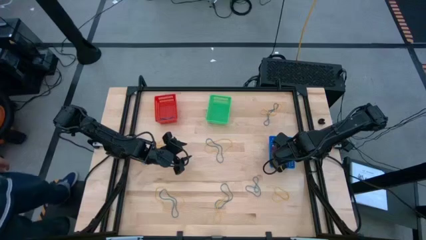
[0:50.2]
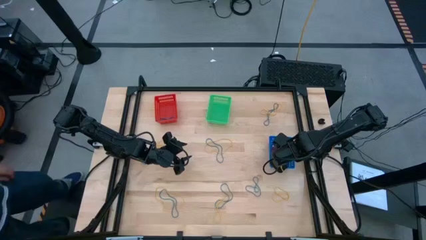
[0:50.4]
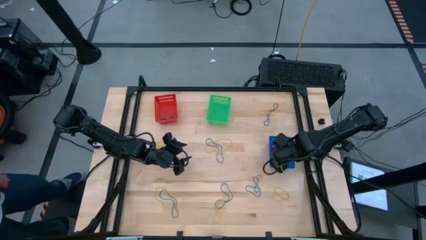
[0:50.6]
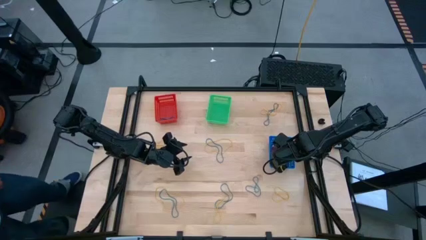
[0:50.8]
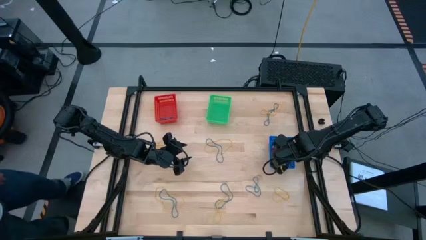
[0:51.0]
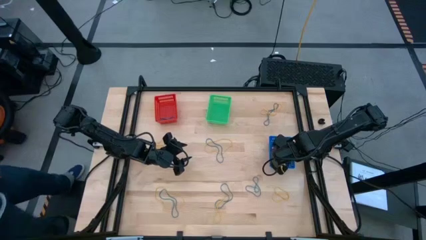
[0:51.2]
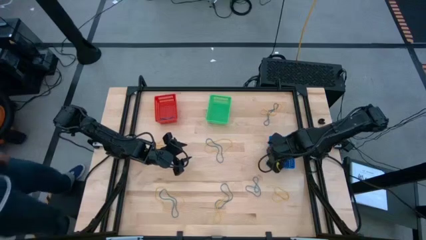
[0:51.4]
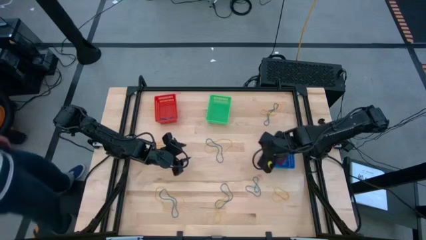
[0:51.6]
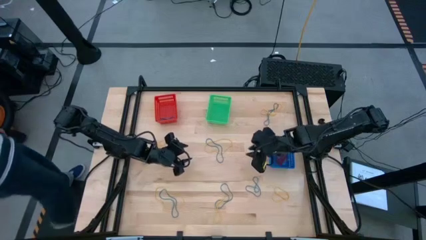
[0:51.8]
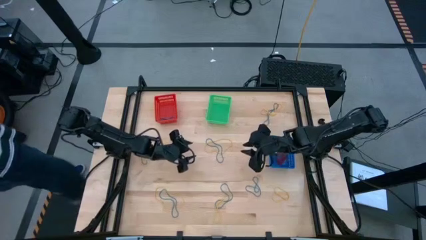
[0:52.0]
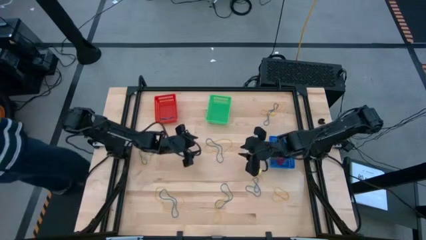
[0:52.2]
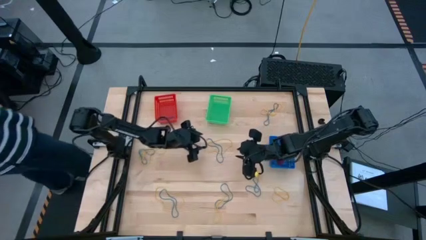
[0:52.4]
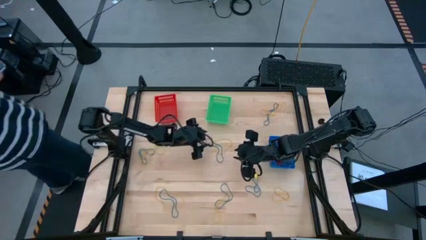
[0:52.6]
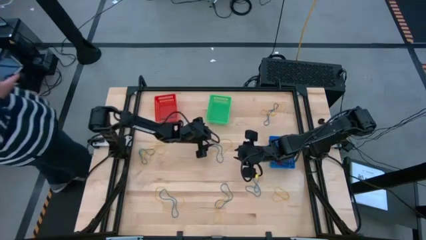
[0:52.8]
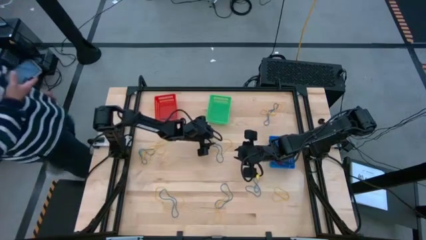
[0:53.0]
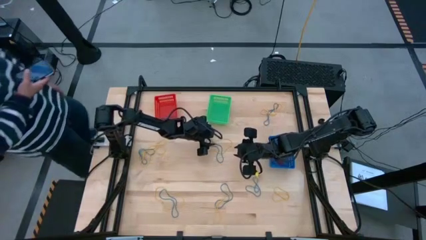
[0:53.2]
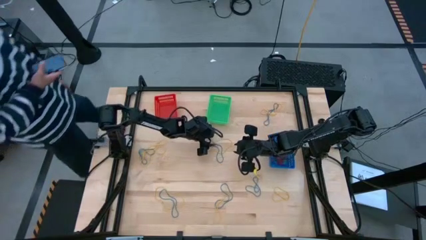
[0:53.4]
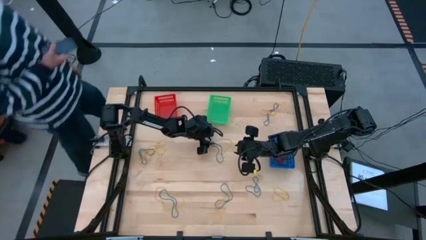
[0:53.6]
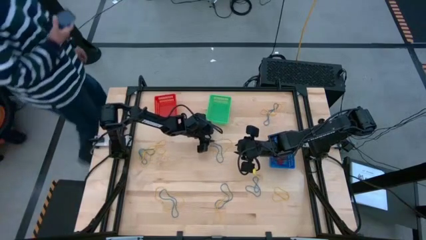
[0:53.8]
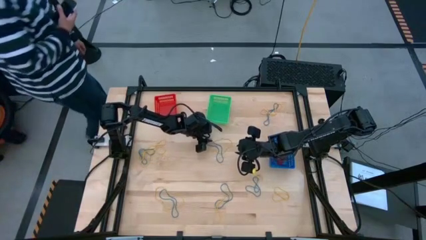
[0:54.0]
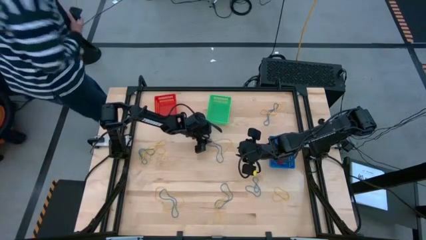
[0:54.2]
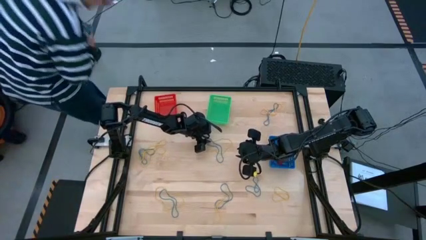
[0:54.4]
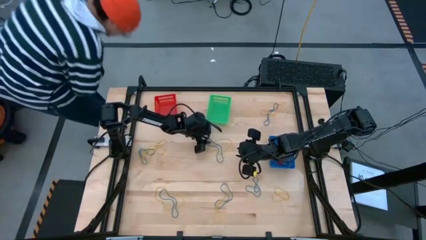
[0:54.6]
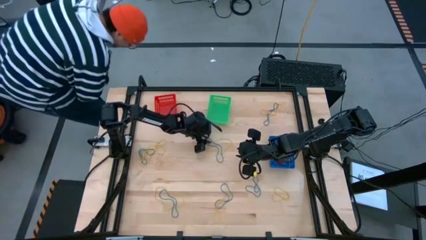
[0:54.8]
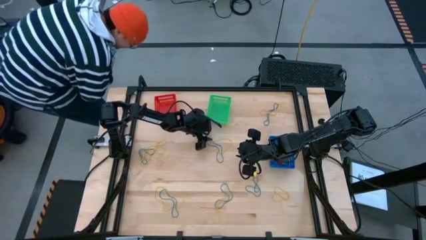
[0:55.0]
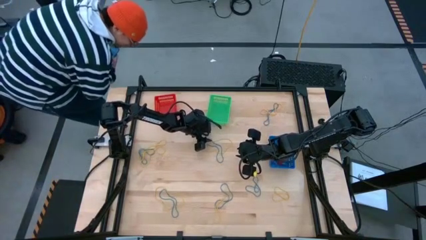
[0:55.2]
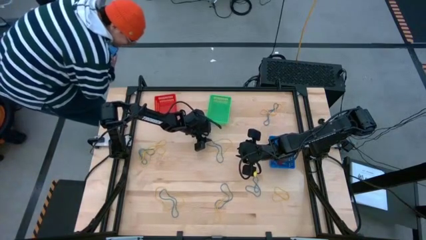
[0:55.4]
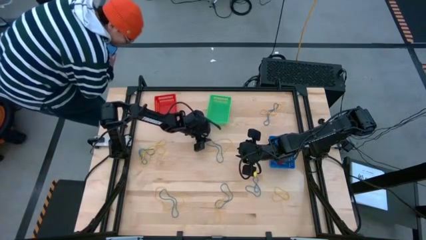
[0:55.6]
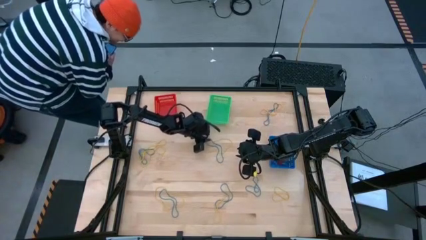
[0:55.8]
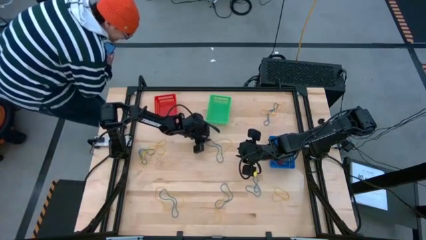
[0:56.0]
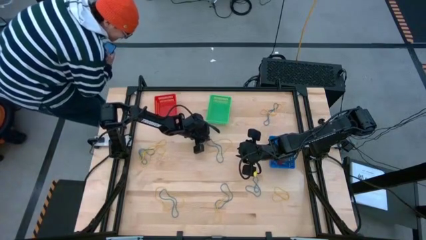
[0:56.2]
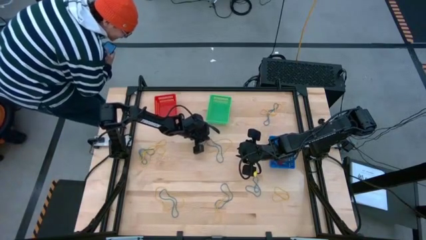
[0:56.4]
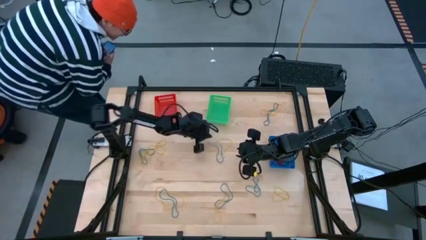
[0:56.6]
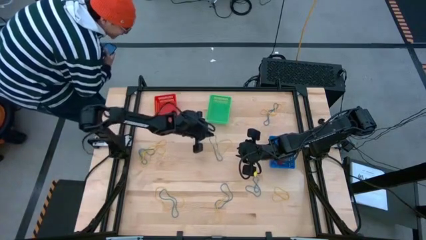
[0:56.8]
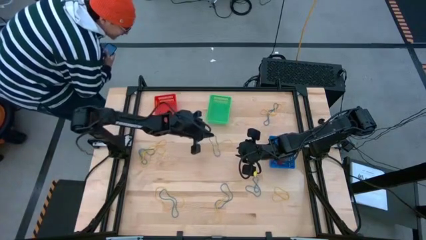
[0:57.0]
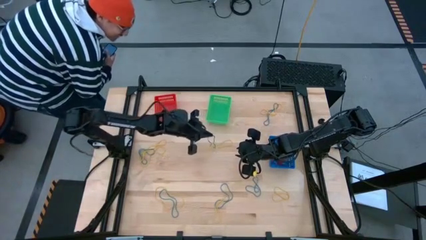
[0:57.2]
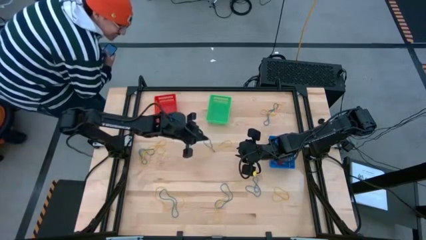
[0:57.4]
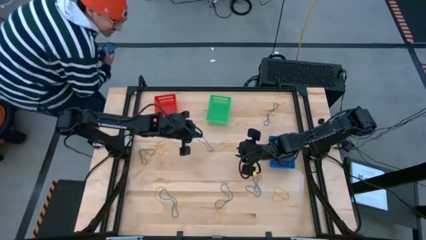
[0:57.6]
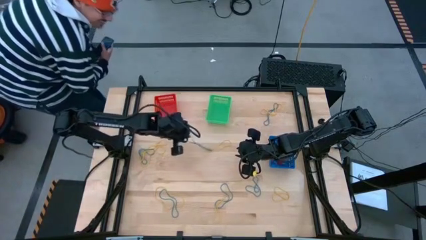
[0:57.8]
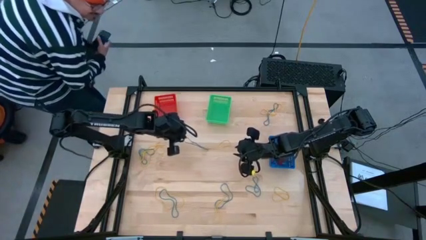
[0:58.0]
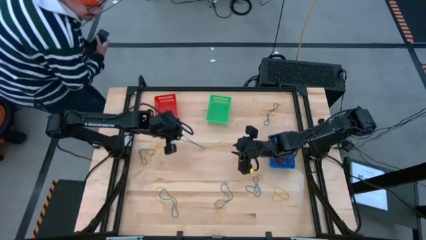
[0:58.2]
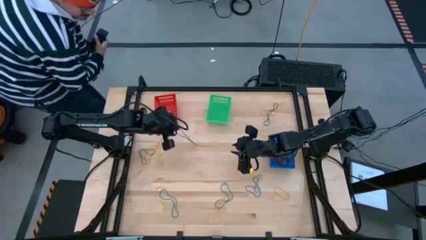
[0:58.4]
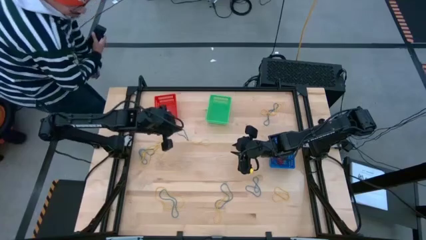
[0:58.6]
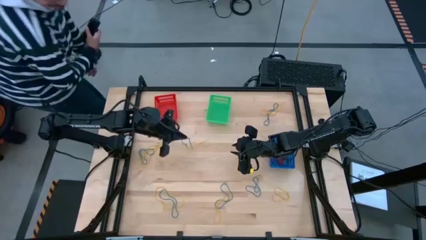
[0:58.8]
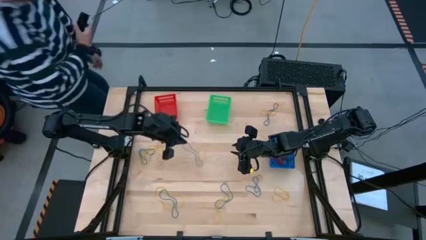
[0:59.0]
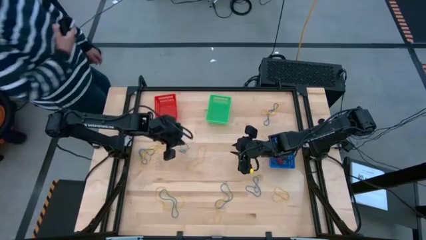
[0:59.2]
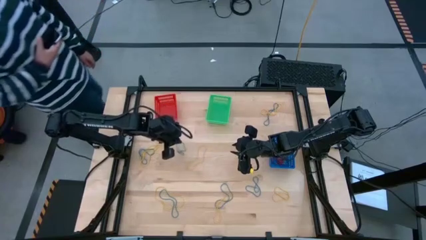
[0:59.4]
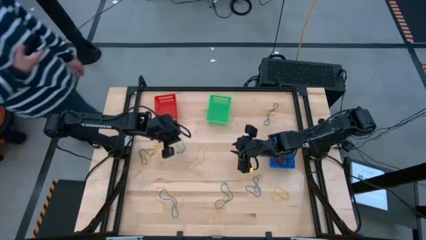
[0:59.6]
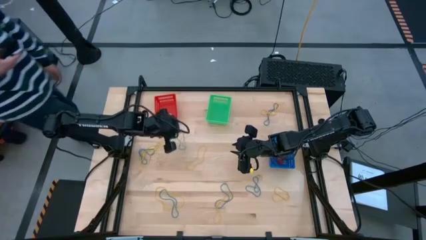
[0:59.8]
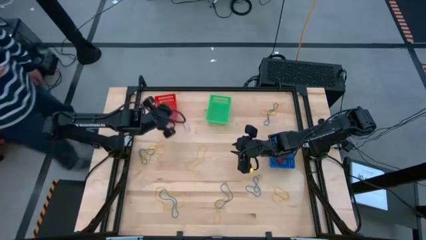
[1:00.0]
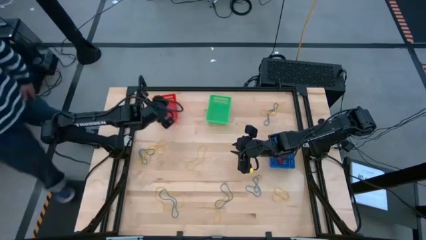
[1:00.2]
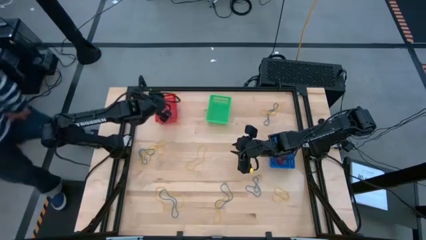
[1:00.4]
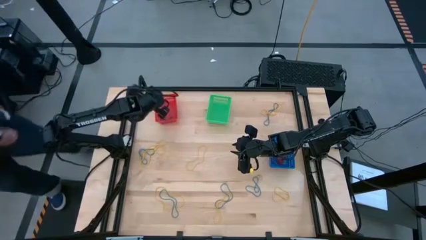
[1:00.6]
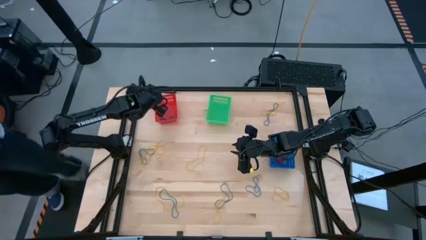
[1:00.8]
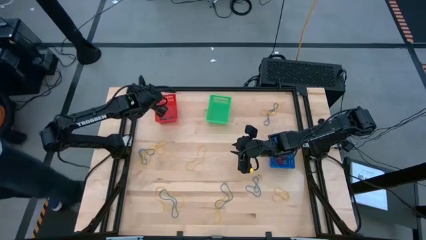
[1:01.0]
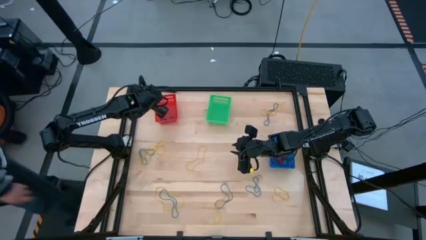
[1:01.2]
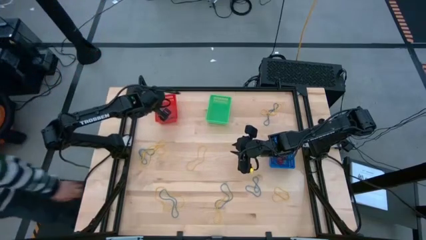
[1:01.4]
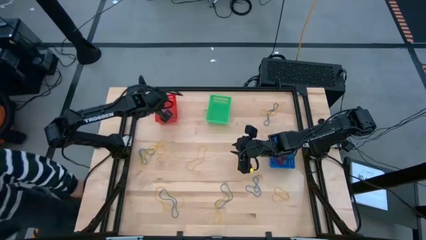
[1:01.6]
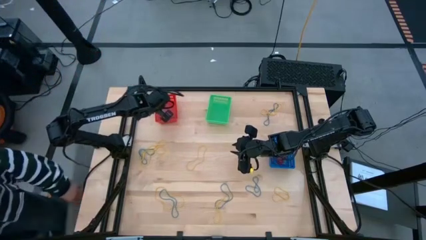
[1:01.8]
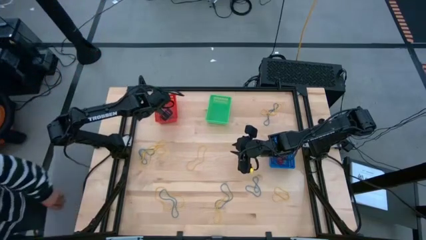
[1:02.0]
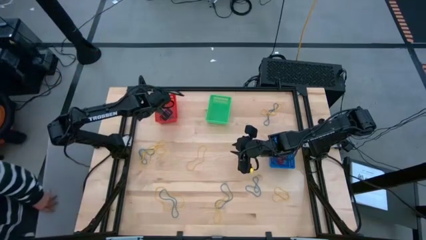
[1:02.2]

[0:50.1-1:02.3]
Task: Sort rubber bands into baskets
Put the blue rubber band into the red bin

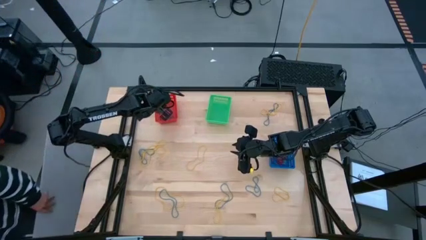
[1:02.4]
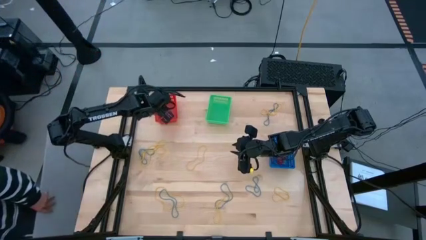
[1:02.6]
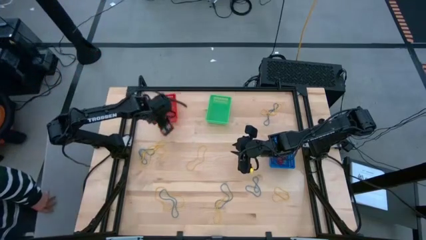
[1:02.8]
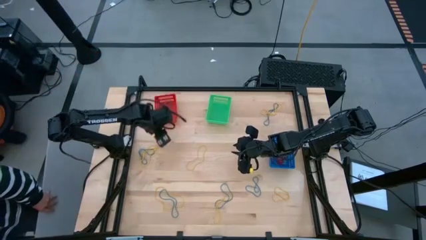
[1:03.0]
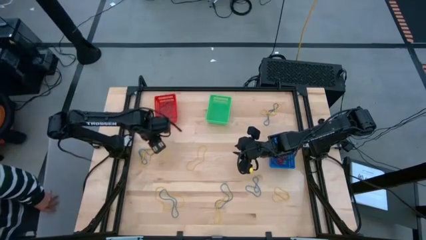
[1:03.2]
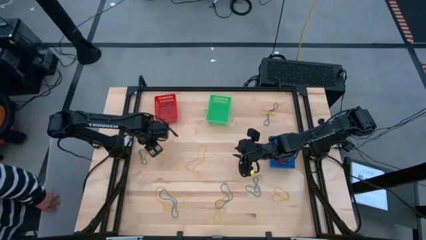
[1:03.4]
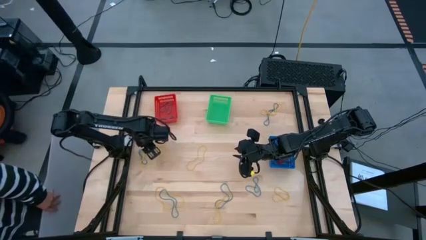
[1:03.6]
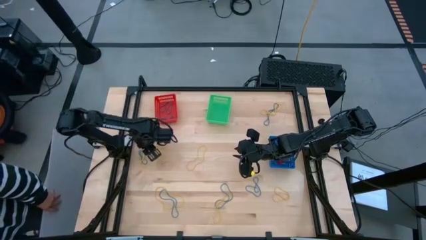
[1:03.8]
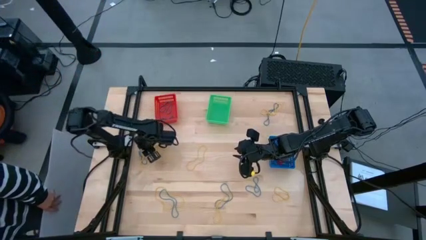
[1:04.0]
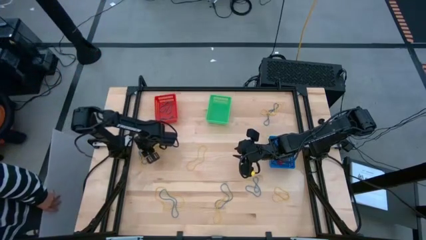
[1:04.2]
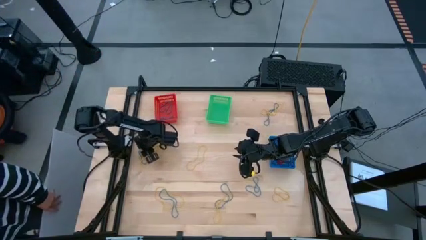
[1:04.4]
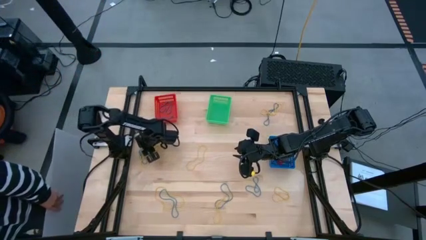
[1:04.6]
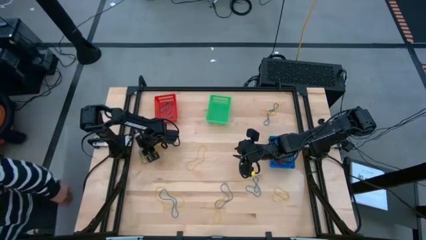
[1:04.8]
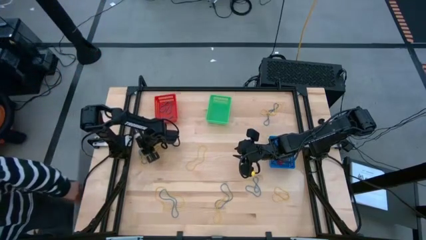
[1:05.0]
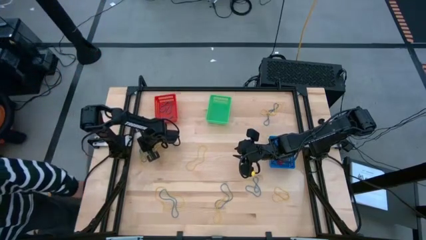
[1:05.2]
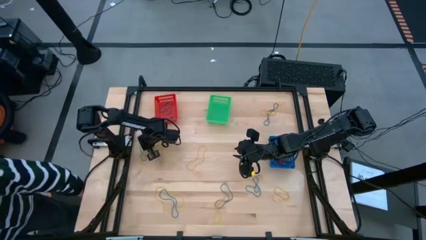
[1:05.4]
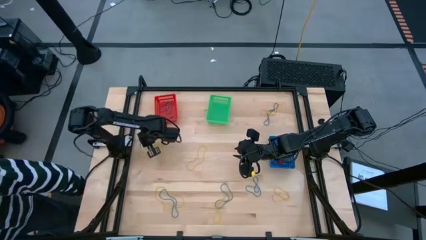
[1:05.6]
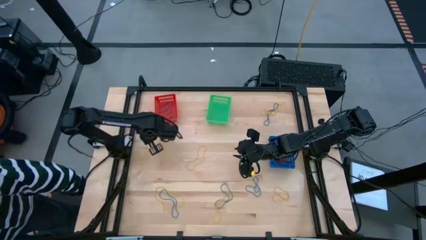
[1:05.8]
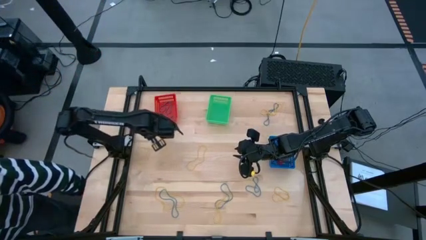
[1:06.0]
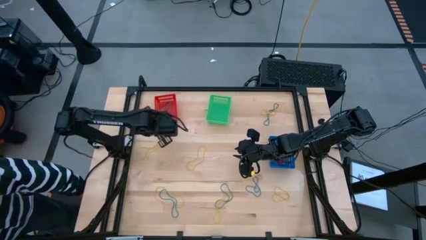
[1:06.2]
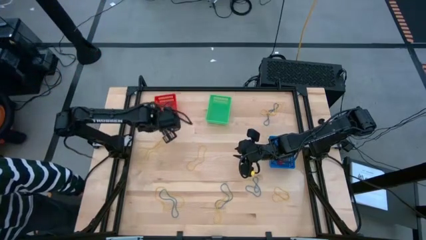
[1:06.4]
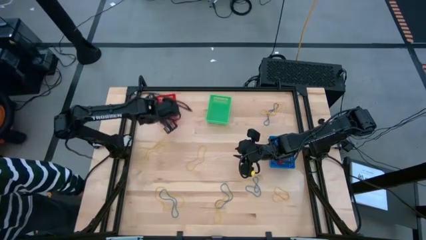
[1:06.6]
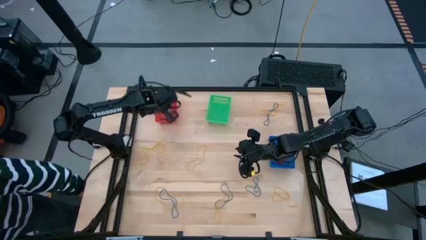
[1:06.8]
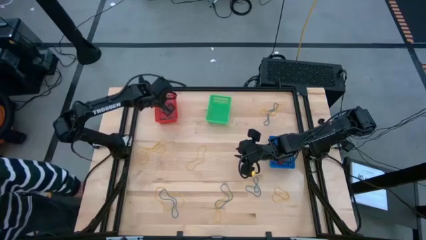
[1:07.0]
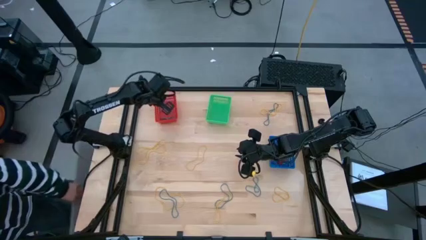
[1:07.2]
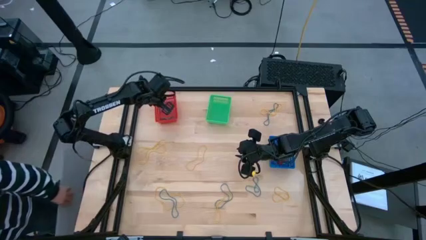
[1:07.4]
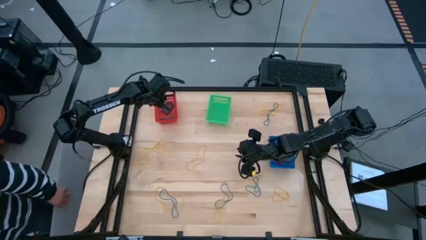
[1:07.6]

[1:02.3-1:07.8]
Put the blue rubber band into the red bin
